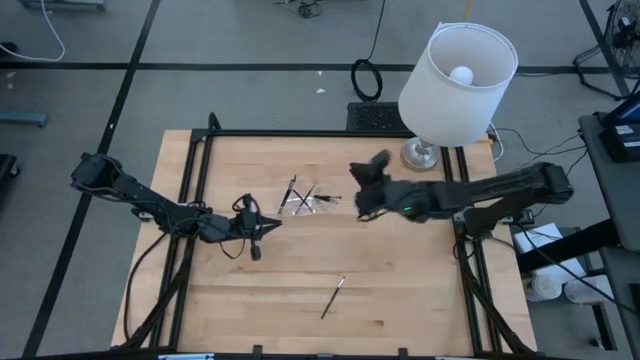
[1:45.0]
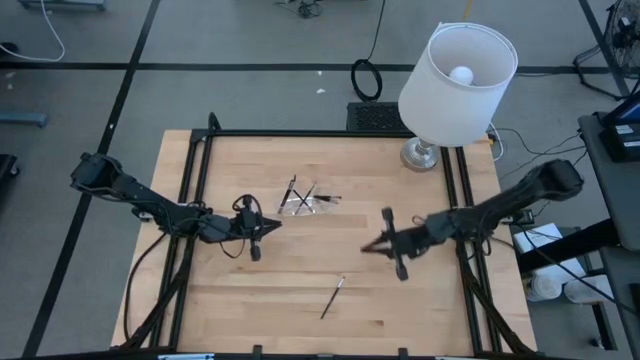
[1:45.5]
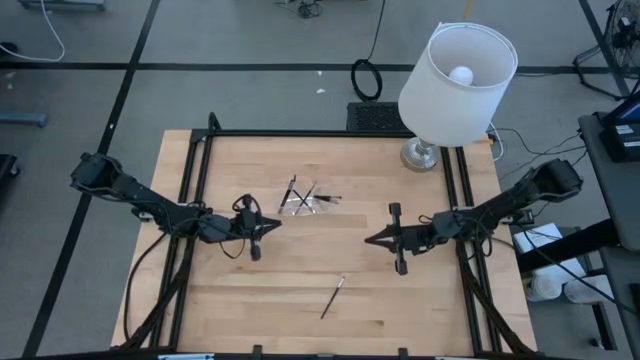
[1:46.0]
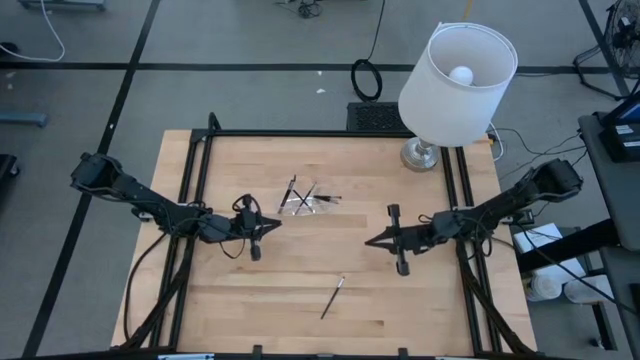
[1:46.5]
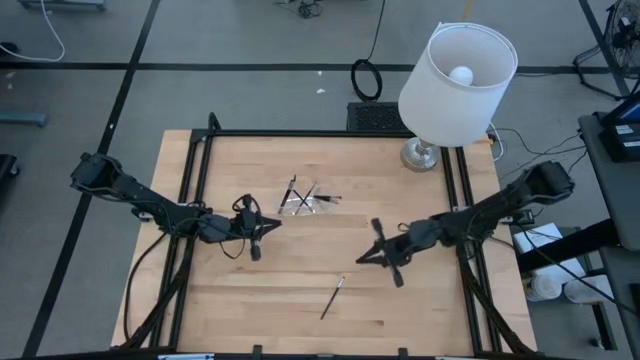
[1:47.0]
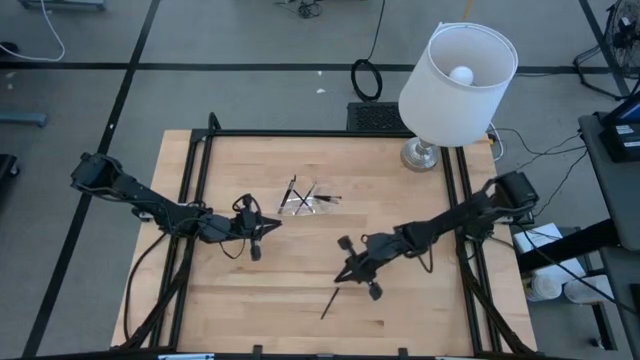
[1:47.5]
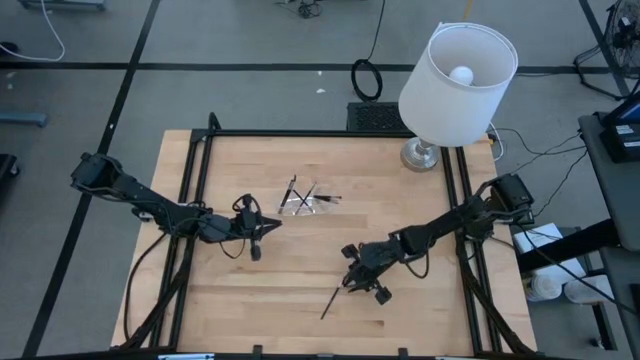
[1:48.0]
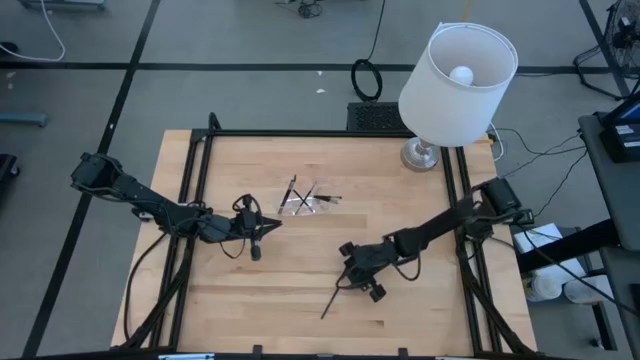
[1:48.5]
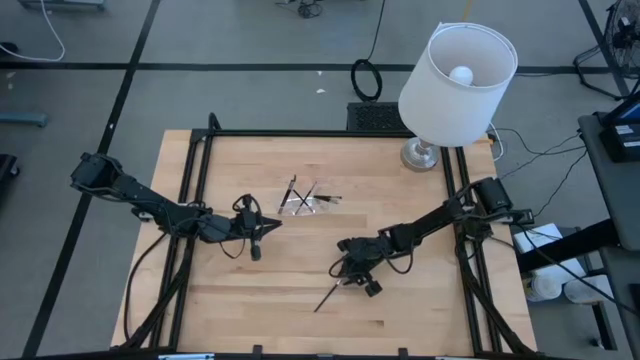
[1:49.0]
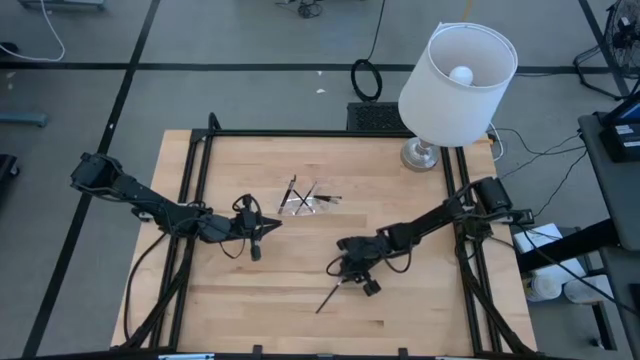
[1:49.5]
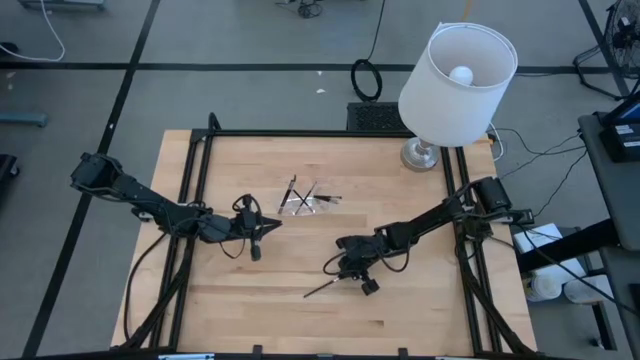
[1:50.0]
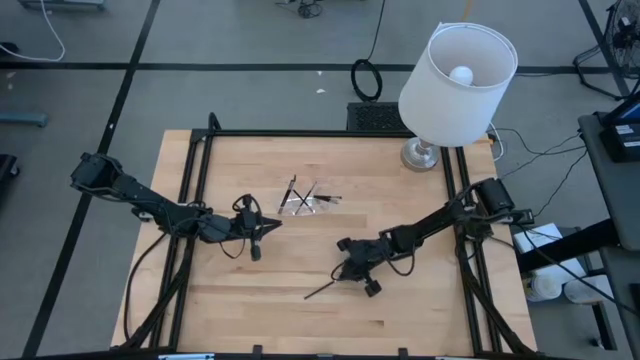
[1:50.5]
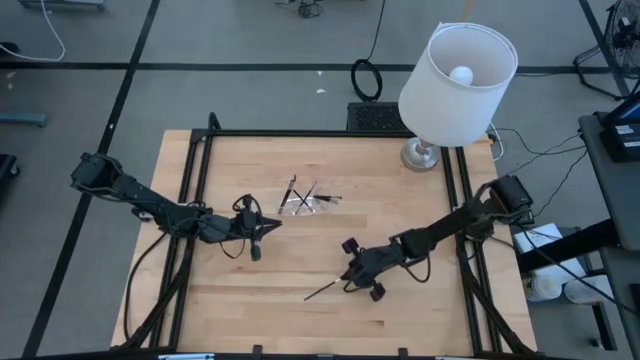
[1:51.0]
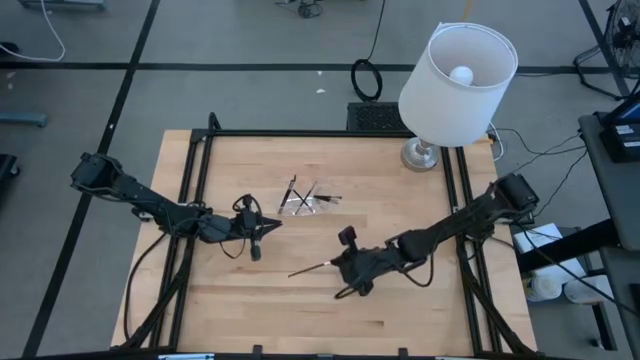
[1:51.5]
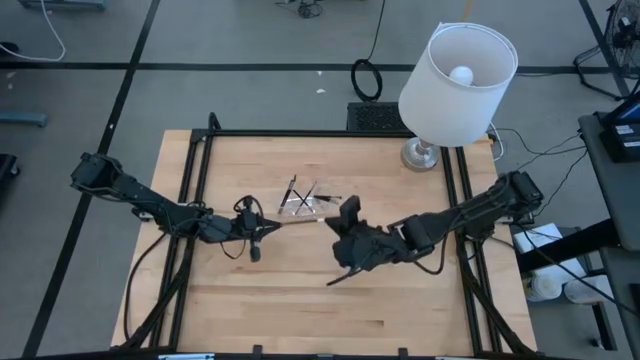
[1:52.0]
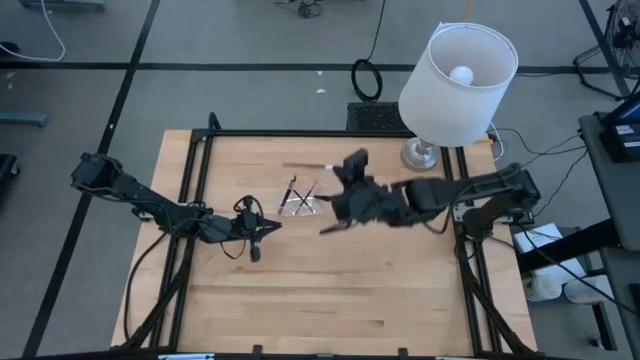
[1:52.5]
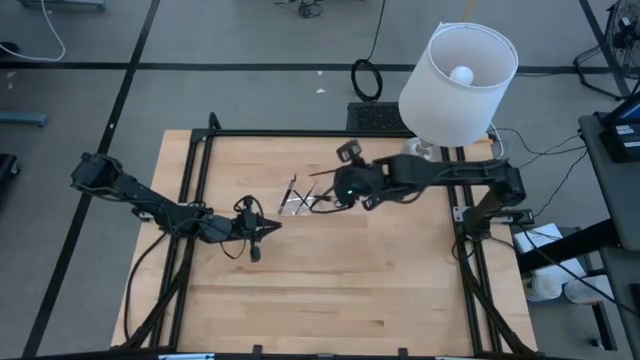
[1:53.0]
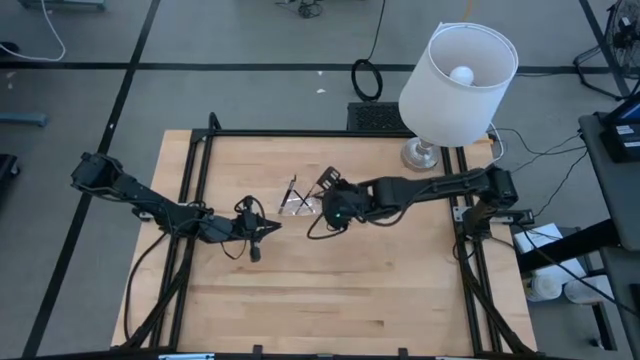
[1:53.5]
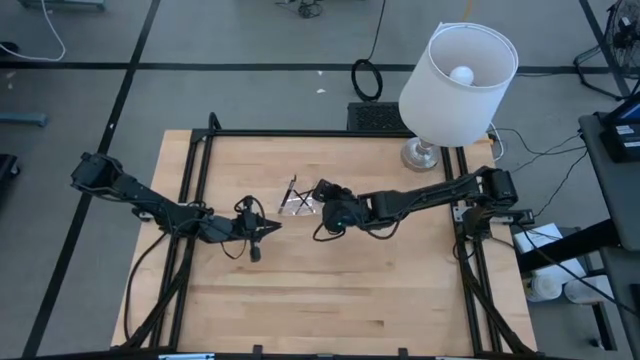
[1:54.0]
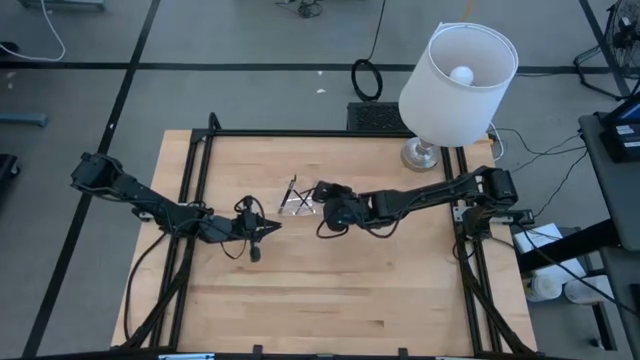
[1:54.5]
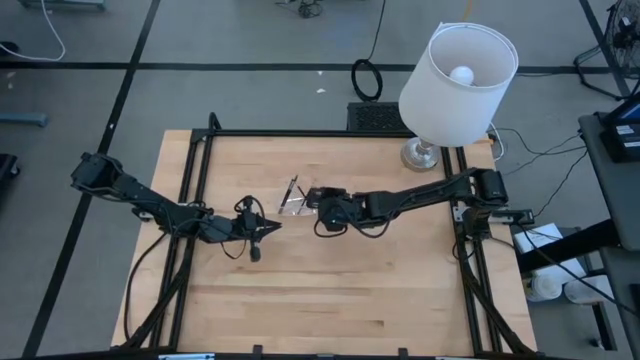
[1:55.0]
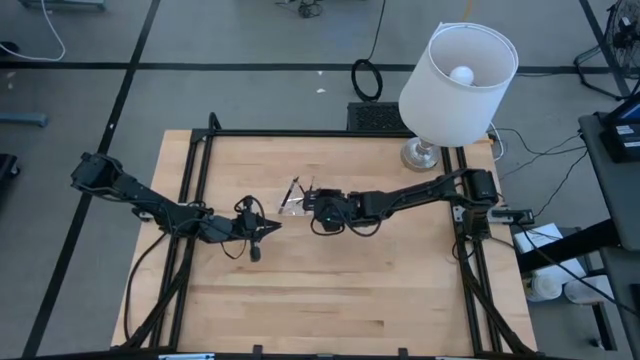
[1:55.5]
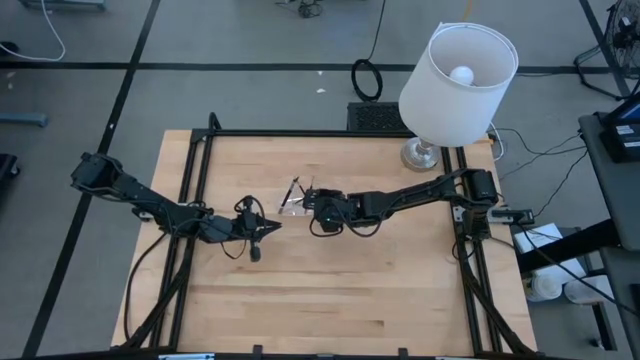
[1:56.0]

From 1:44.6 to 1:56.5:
Task: Put items in baskets/containers
Put the black eyeshadow brush into the transparent organizer

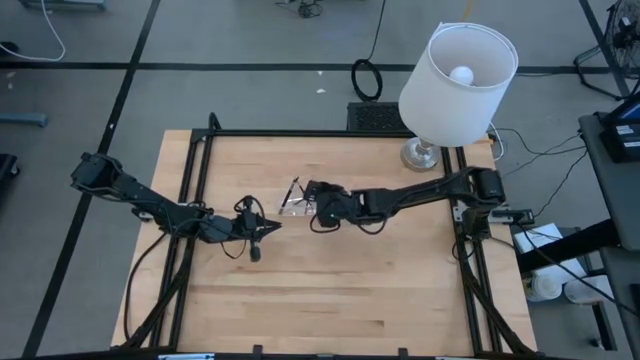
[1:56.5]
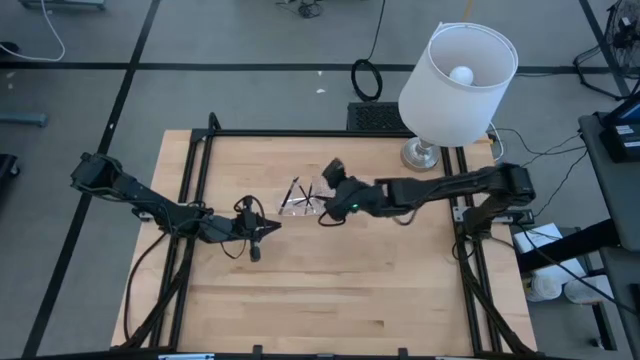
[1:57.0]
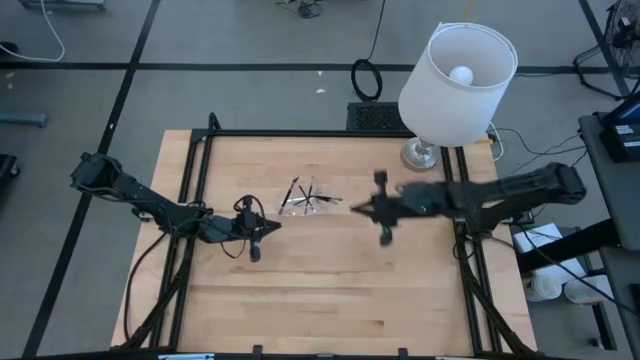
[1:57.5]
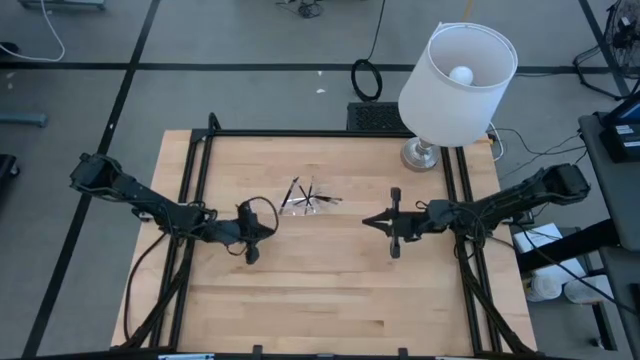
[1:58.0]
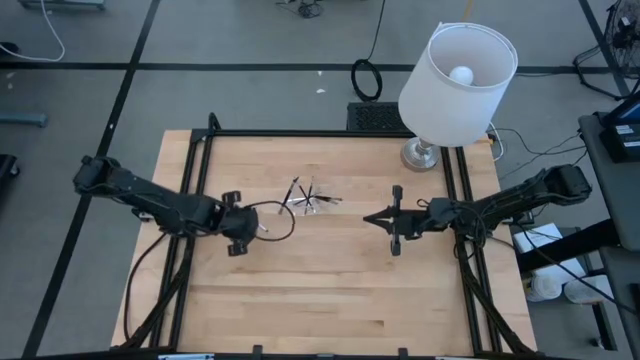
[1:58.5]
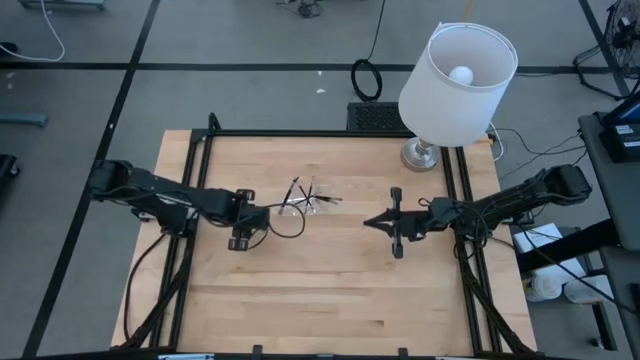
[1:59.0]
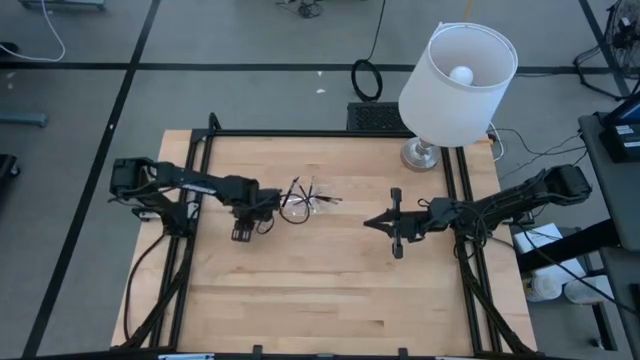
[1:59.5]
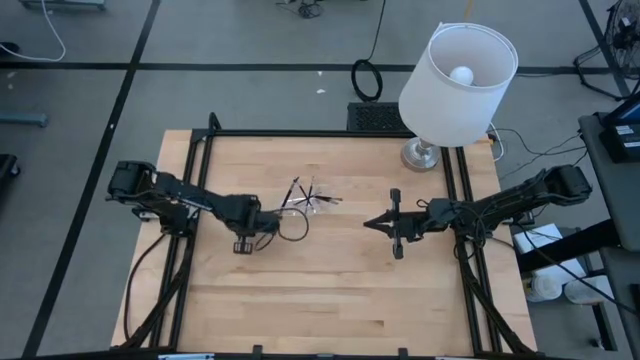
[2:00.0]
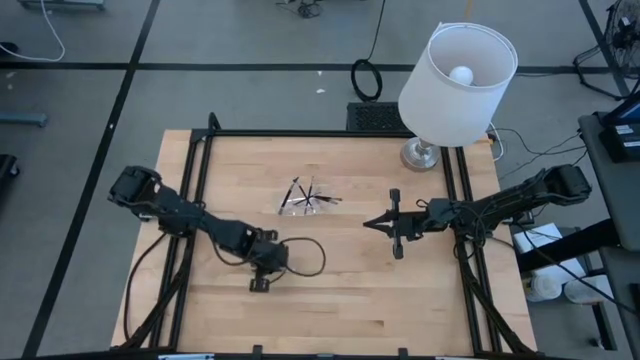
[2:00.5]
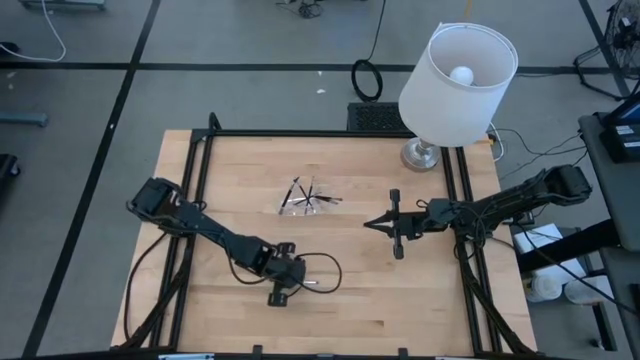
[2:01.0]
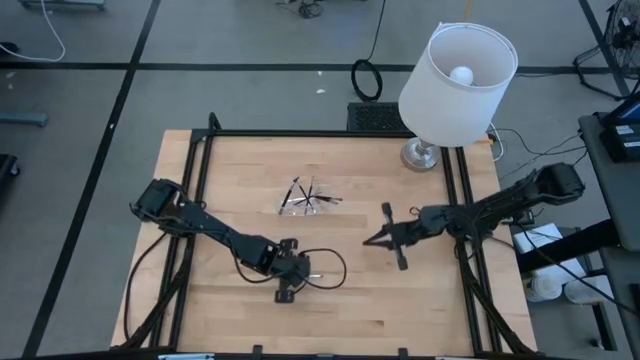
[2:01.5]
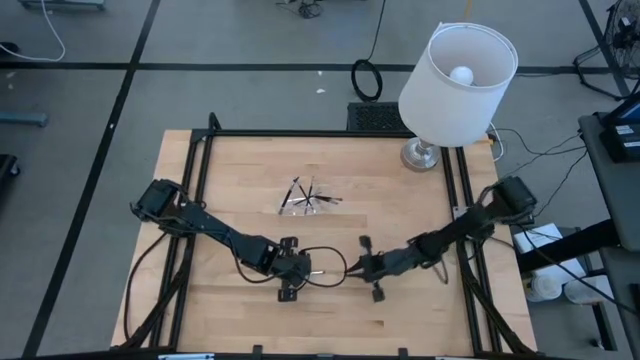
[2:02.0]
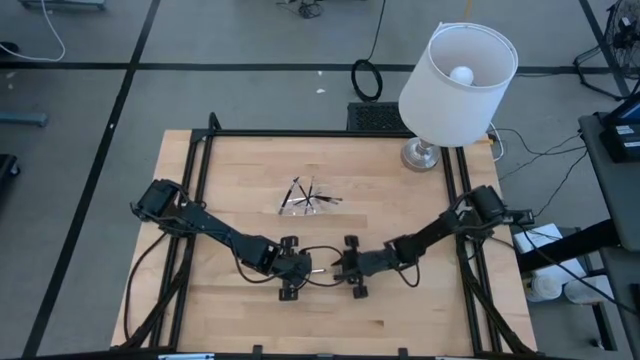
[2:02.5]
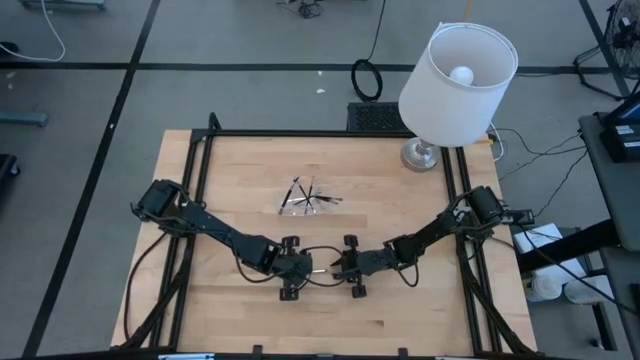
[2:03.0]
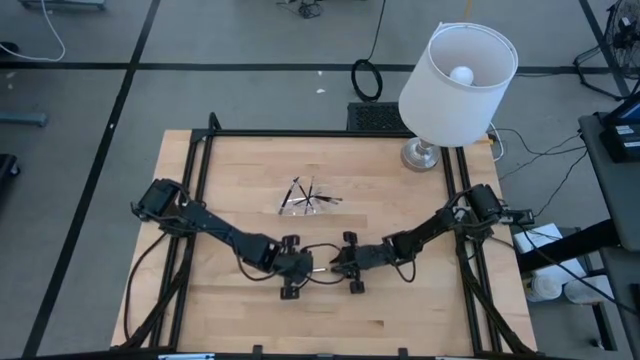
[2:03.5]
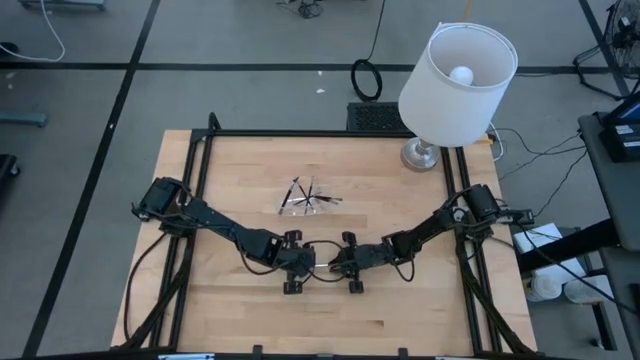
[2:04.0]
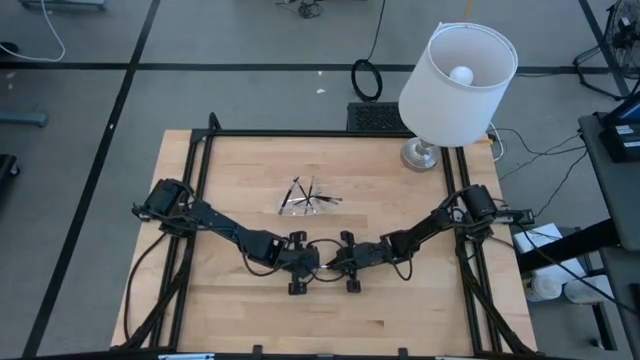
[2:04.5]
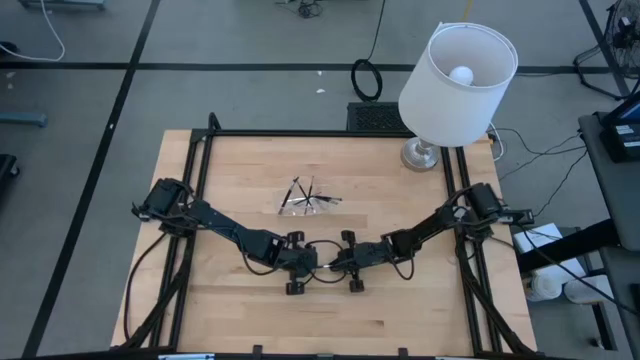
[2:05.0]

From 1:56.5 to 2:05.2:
Put the black eyeshadow brush into the transparent organizer
